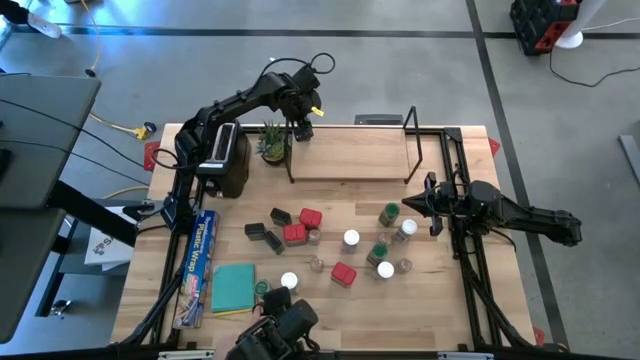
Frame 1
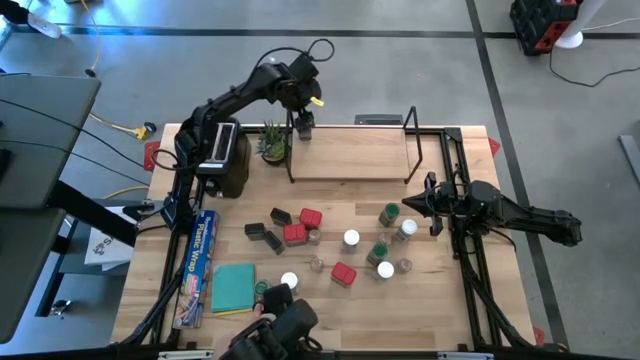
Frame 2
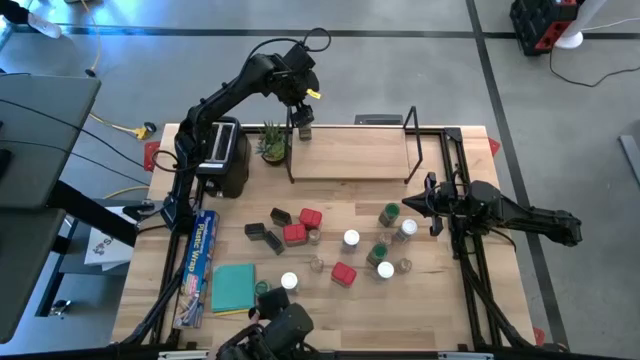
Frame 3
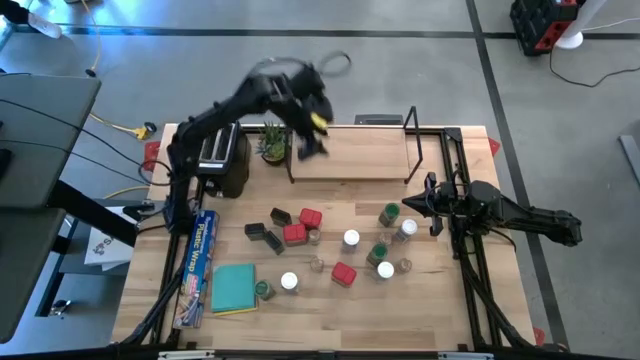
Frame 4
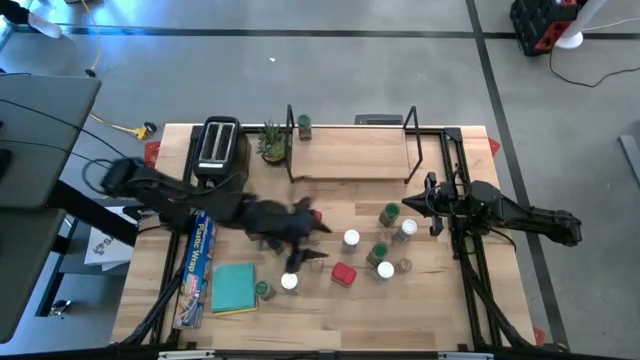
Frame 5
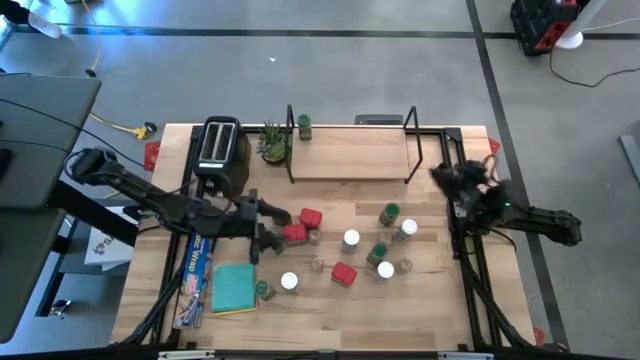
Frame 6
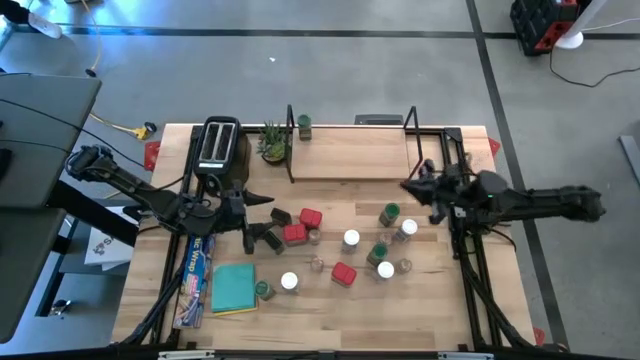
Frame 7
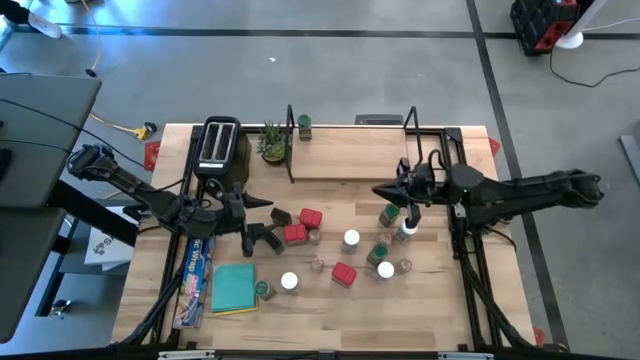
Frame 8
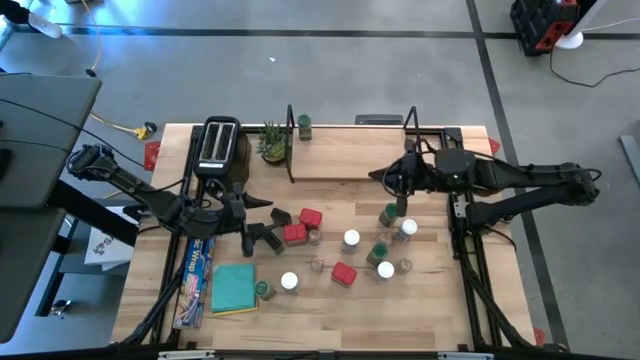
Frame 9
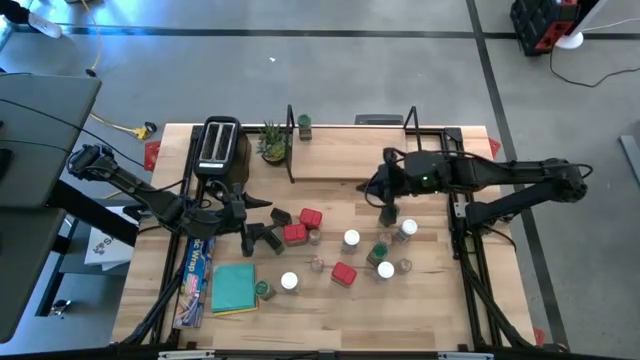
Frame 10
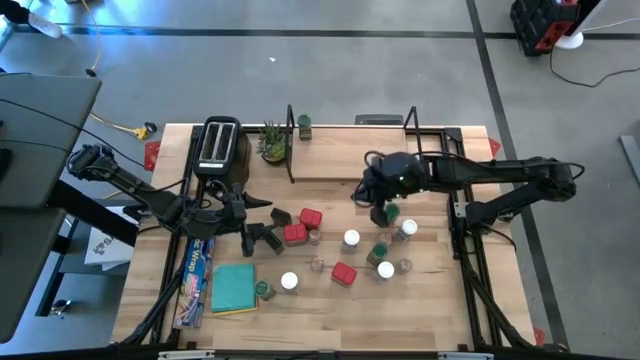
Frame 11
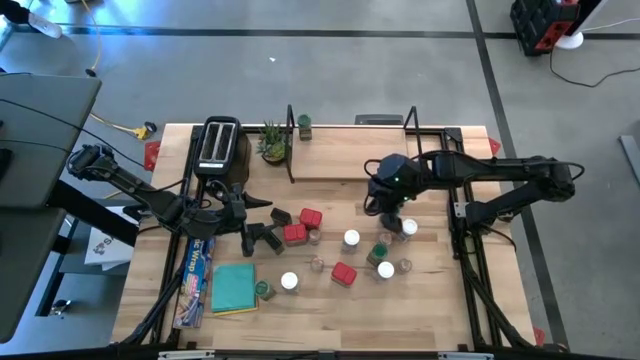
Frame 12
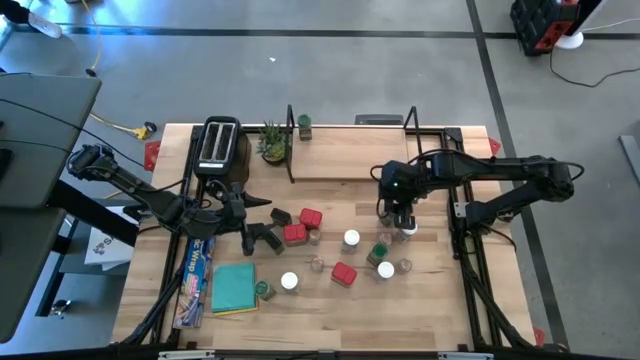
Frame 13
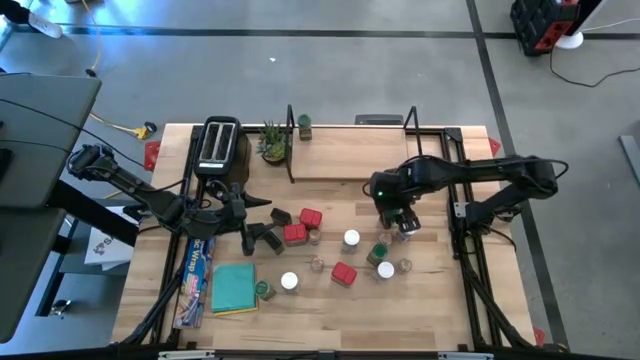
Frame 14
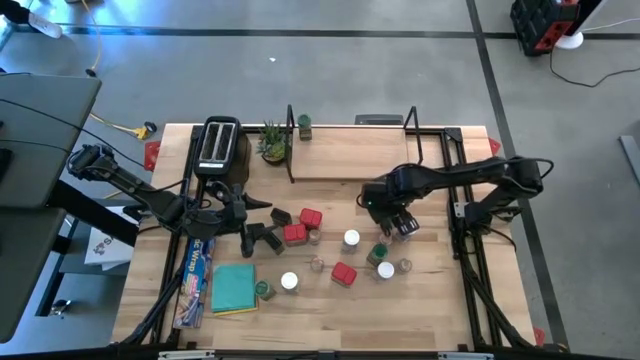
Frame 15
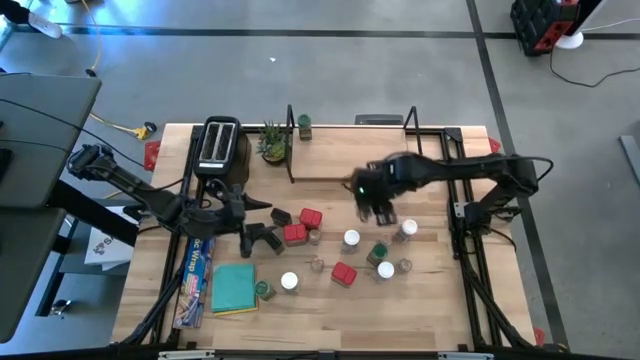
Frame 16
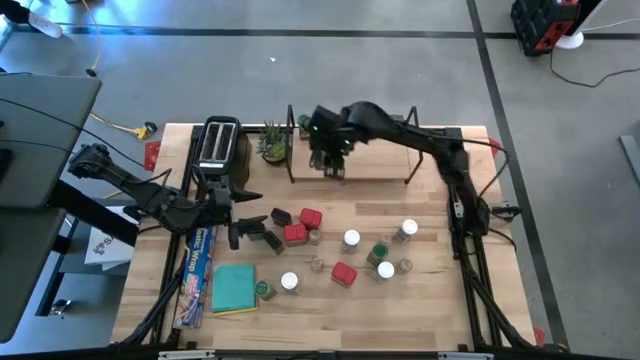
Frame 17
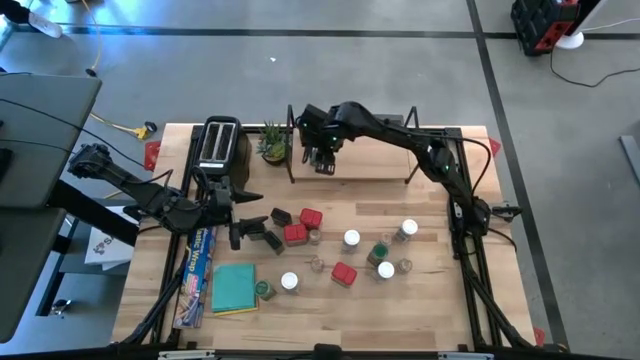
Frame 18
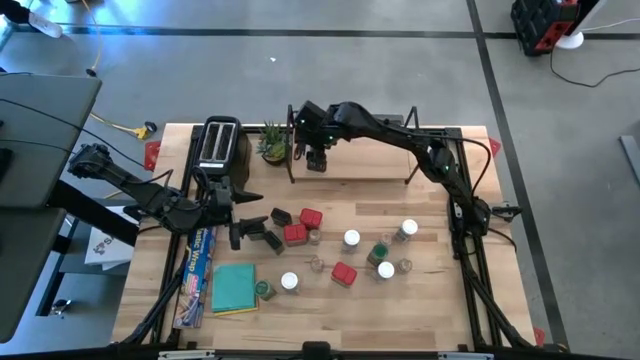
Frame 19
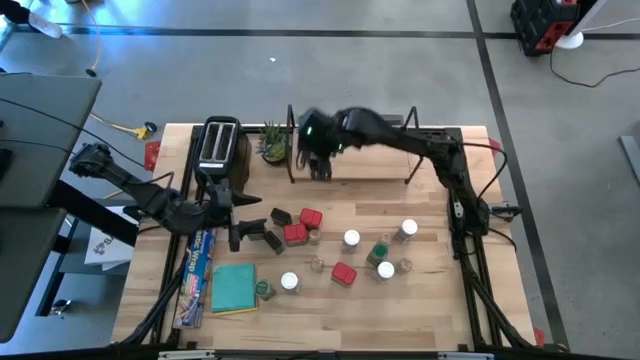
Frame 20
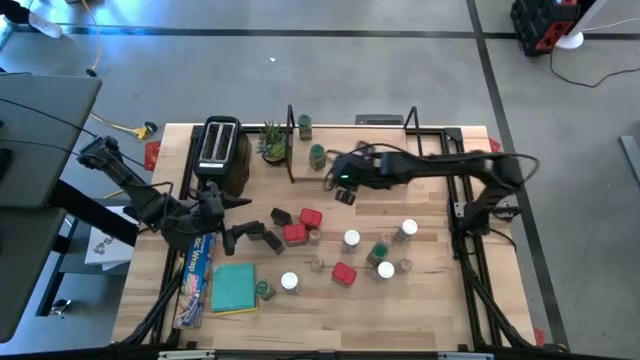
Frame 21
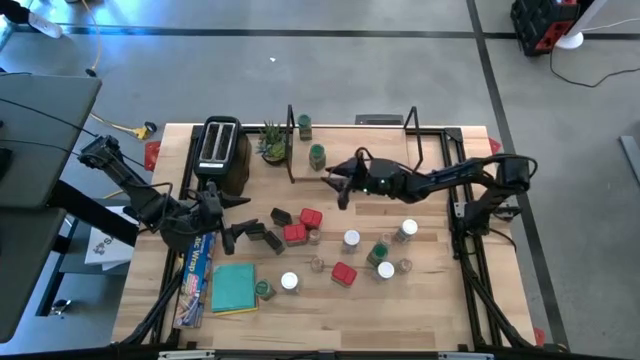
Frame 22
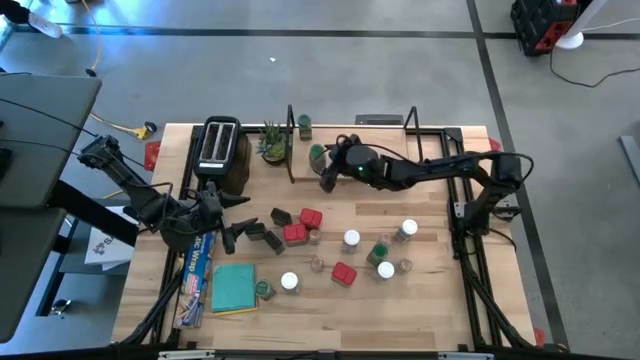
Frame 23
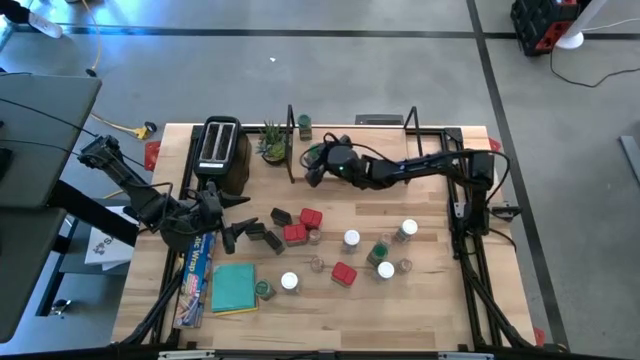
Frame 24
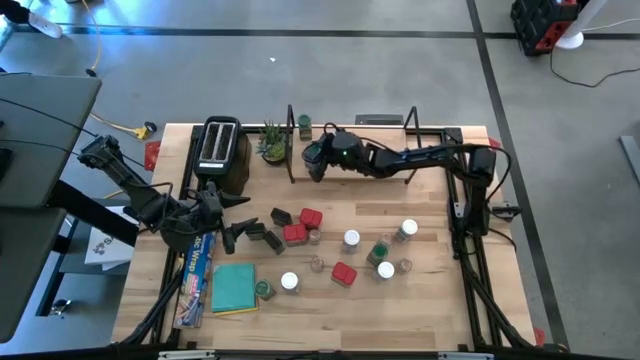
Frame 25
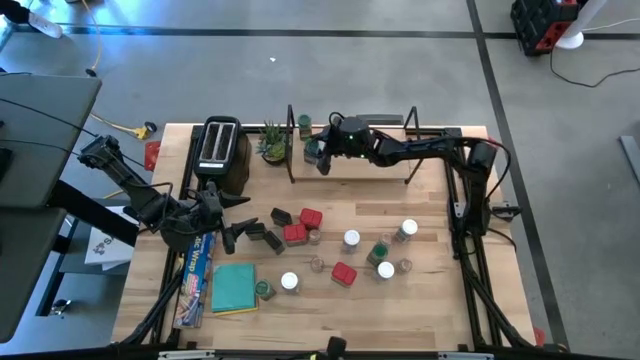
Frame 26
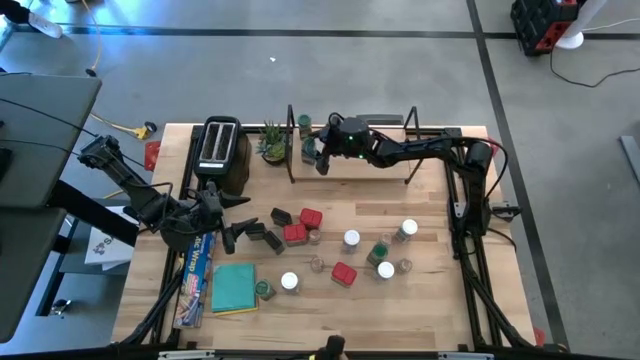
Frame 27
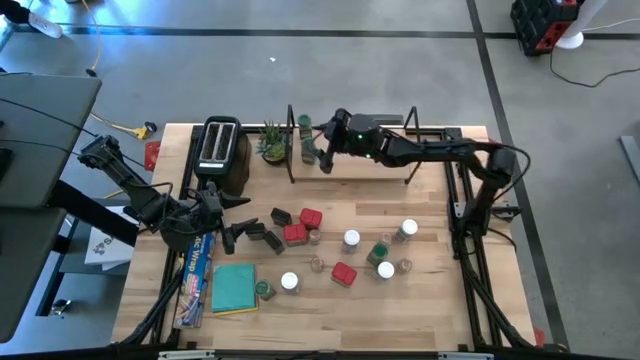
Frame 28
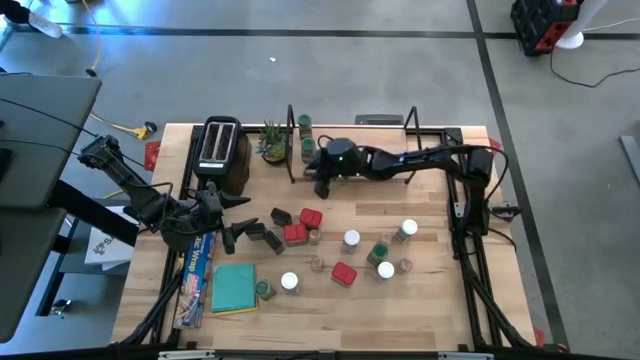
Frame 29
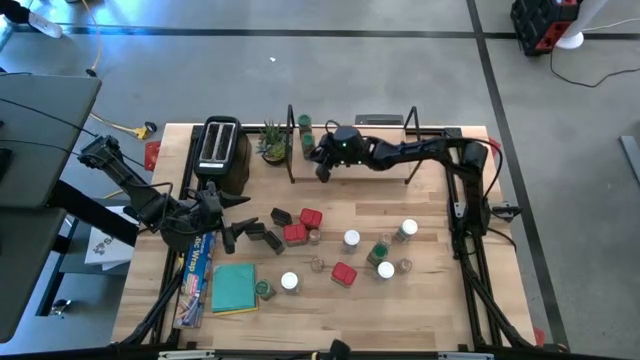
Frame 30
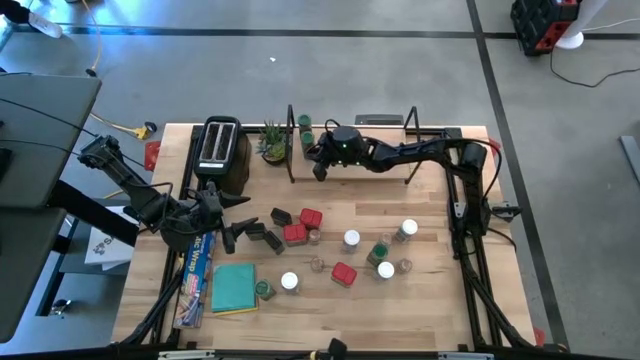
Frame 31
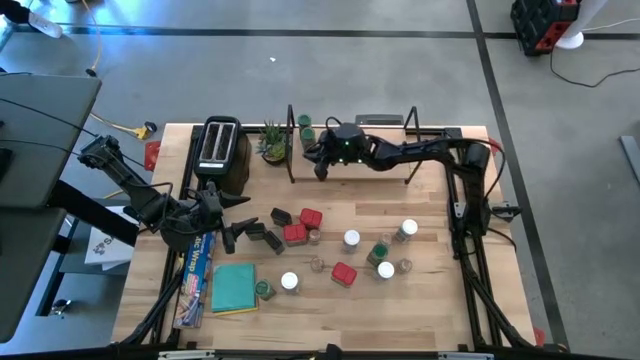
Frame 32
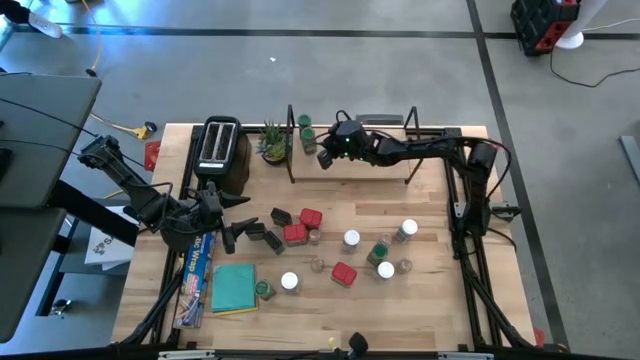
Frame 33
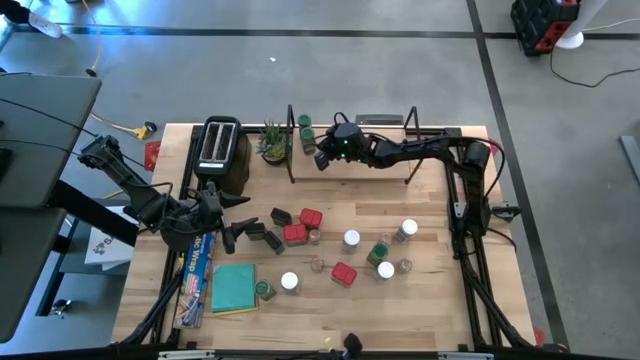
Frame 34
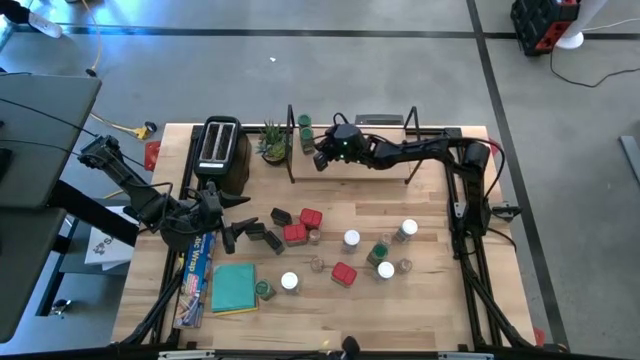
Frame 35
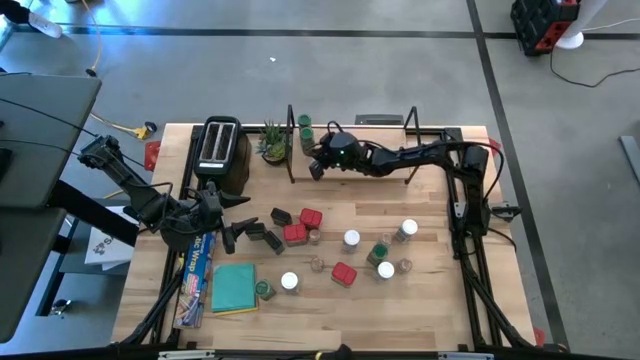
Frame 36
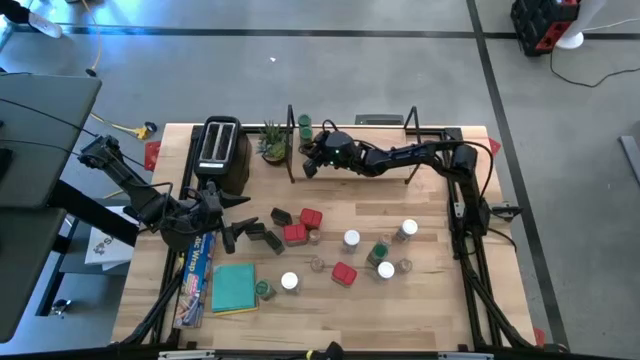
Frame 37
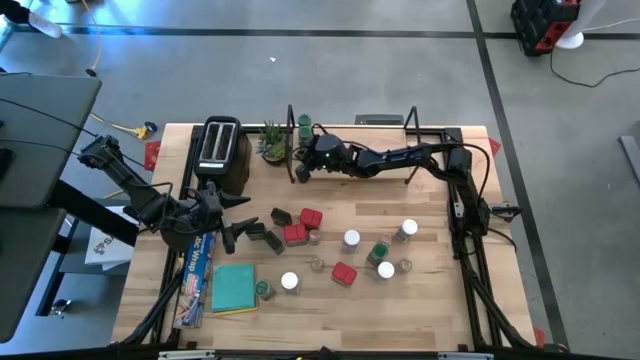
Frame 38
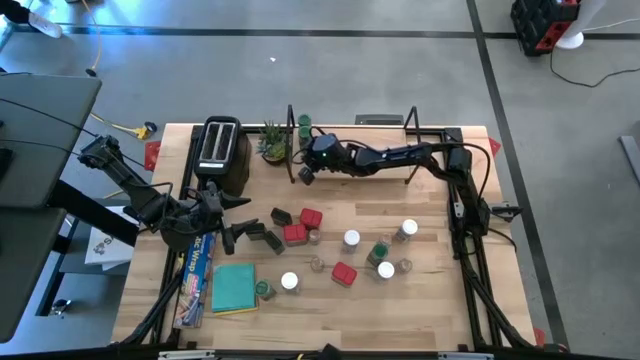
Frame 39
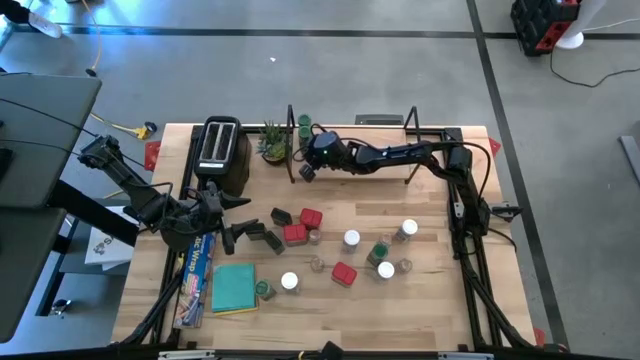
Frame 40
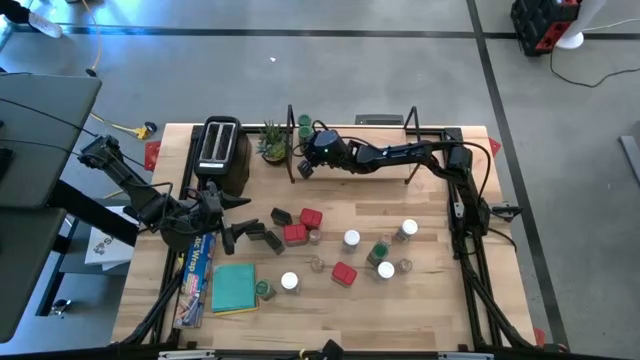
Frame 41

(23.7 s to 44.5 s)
Task: Shelf spices
Put the top right green seasoning bottle on the shelf aligned with the other green seasoning bottle
